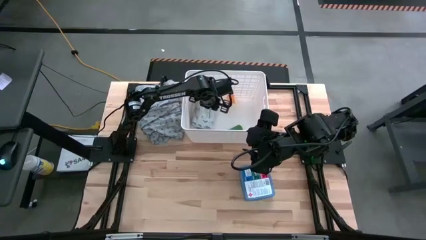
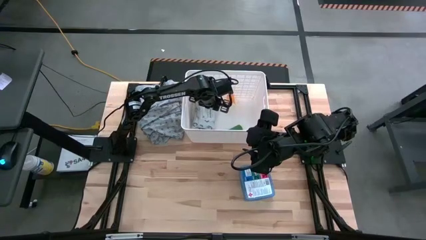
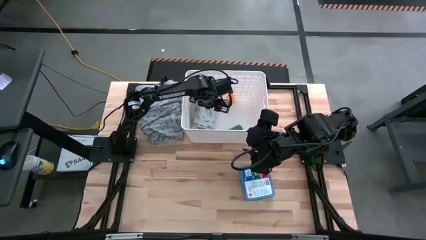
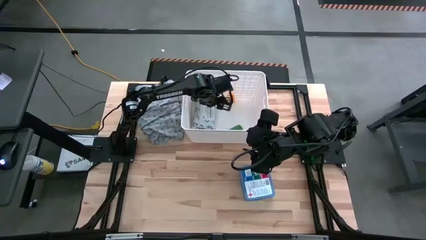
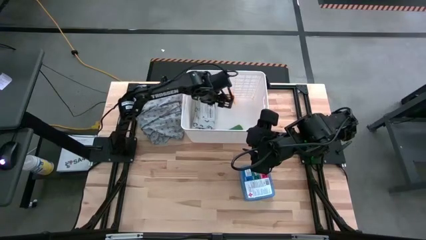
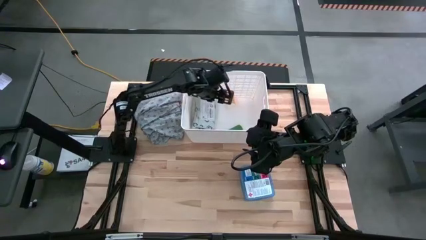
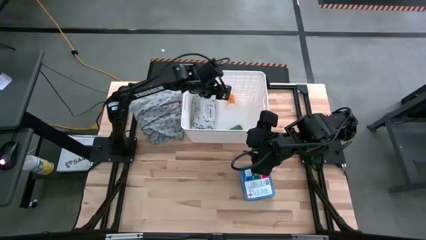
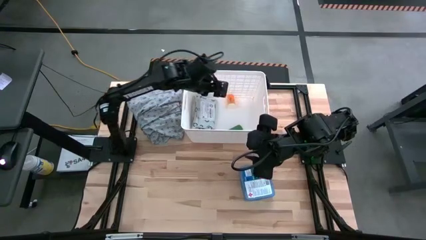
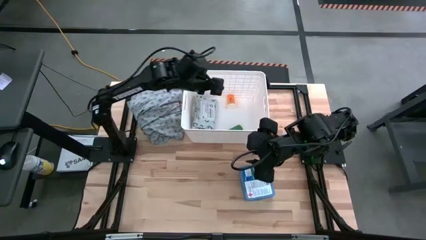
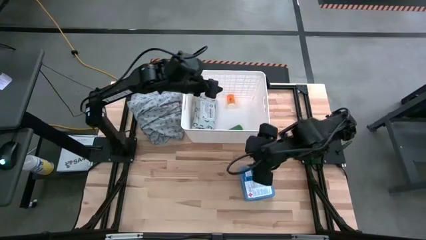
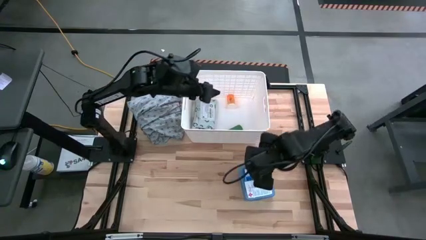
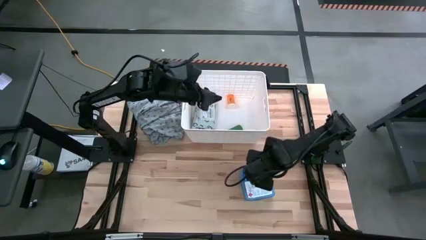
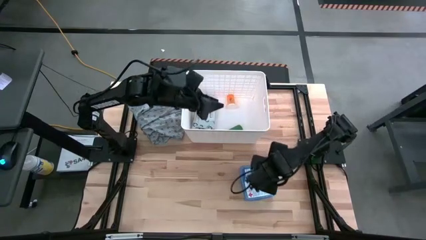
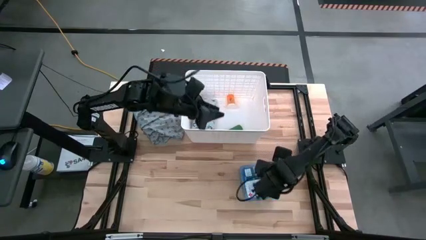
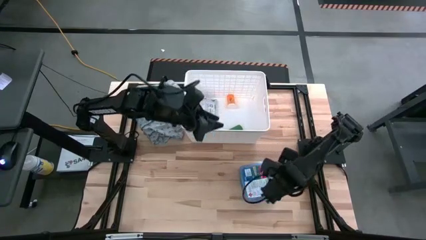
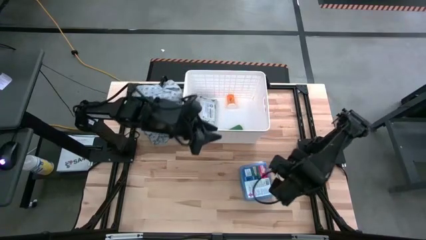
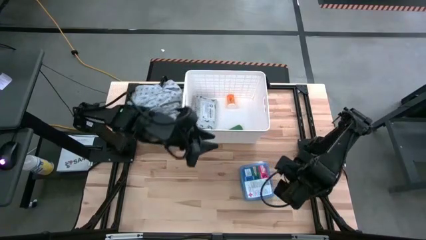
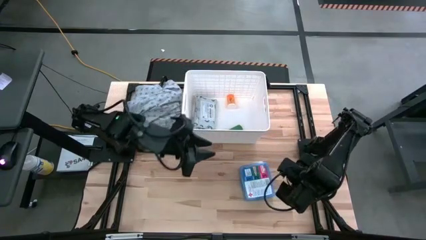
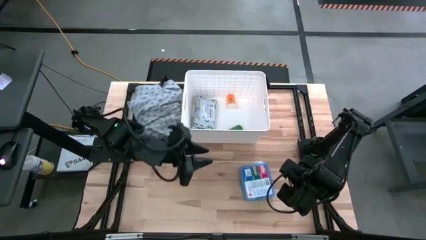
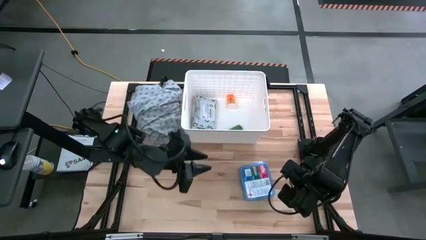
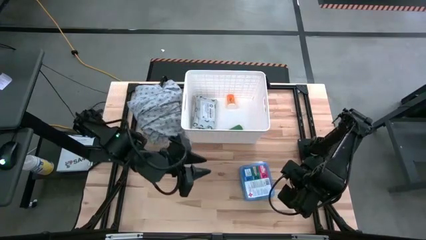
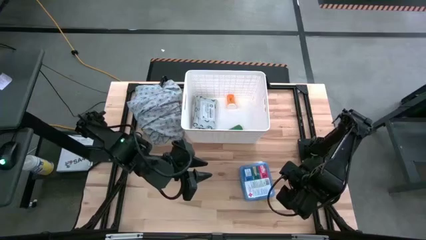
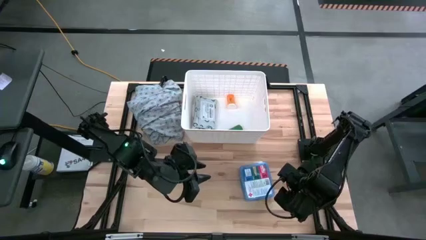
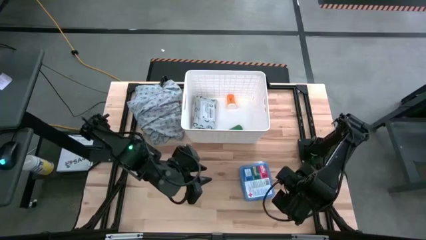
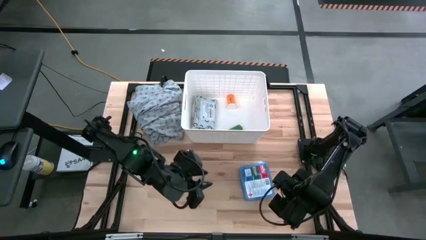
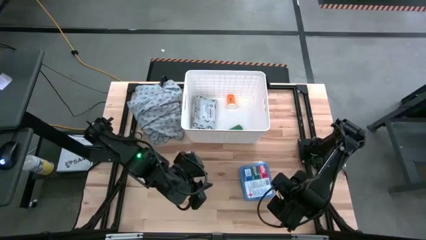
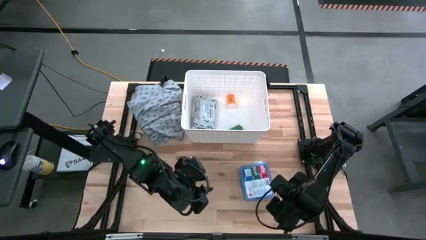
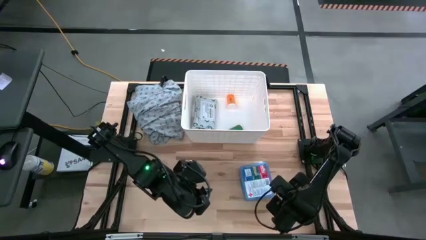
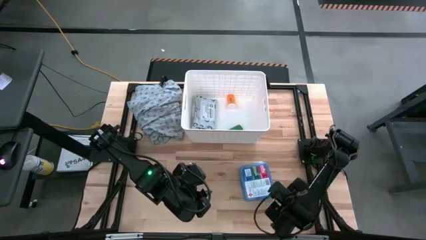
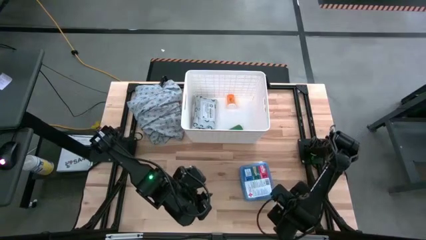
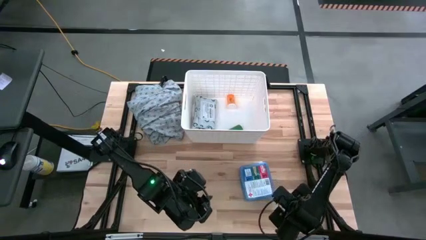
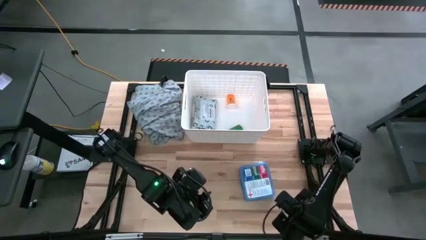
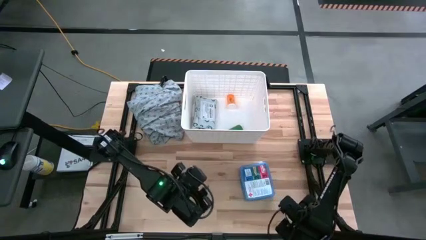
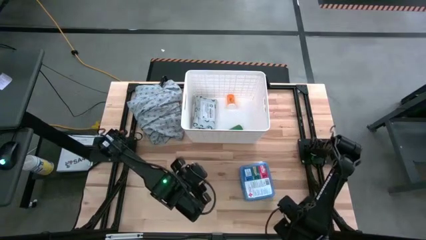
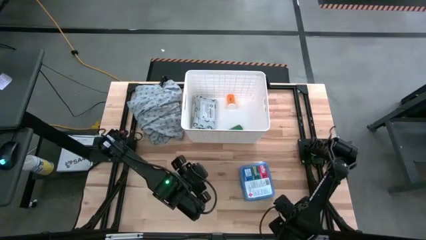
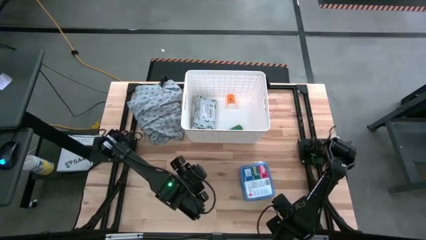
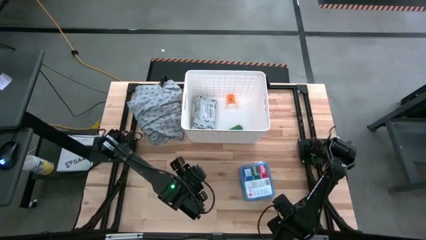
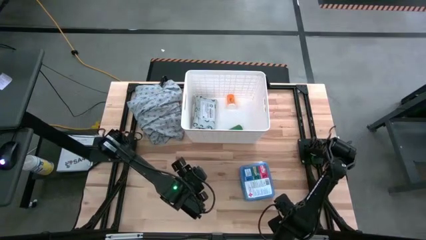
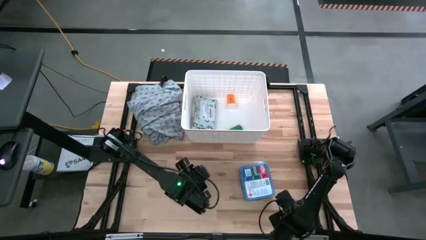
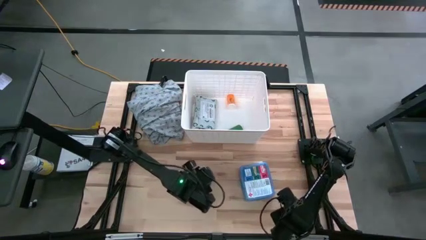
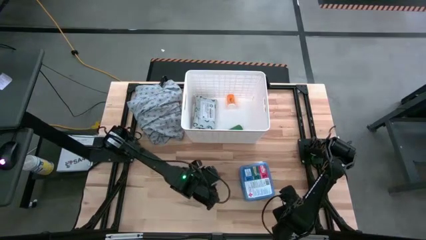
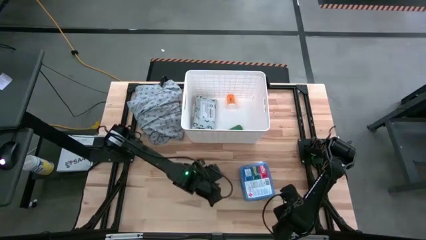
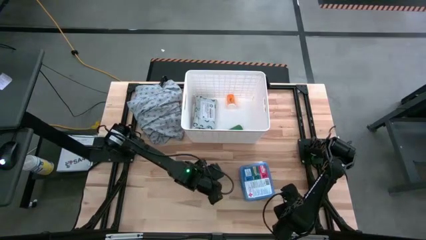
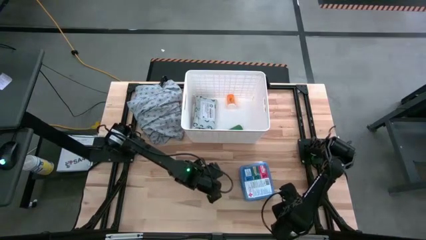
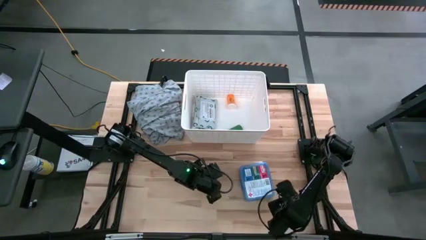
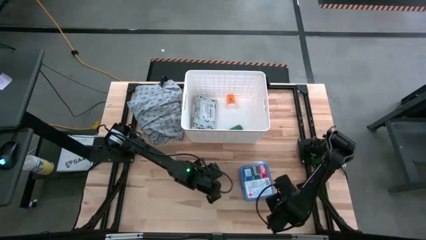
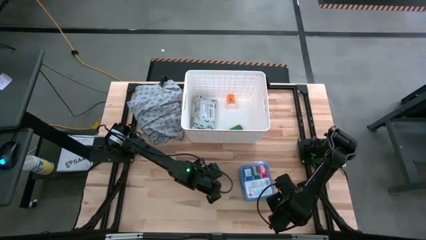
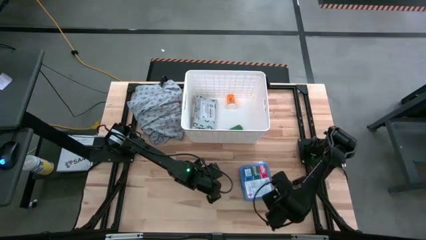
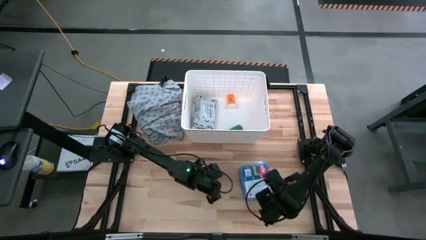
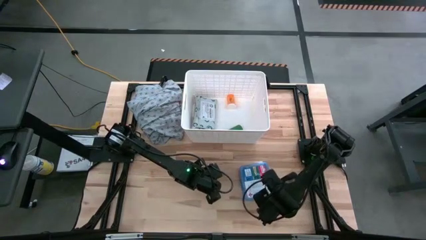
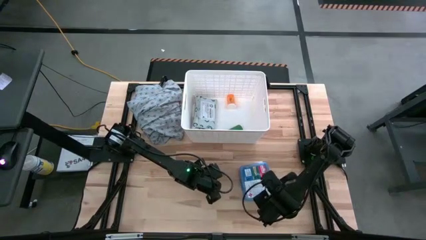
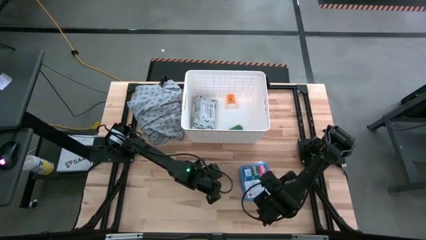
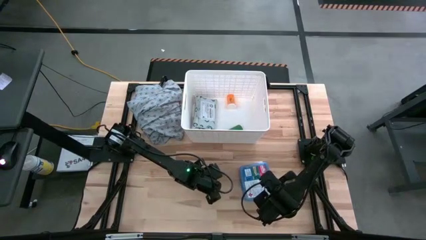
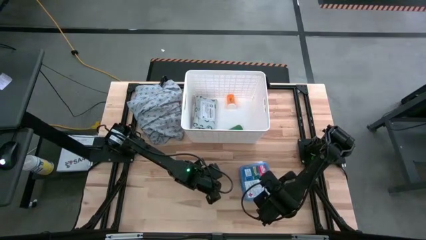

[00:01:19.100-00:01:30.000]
Task: Pick & place medical supplies in basket/bin
Put the blue first aid kit in the white bin

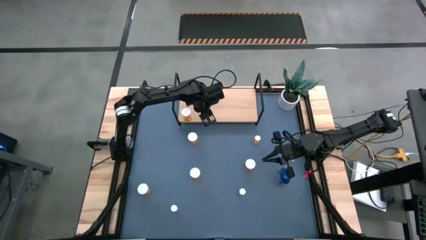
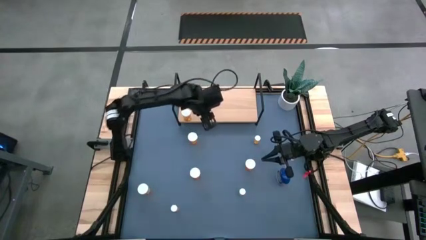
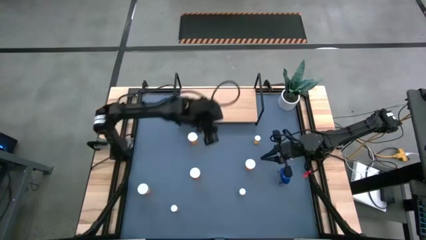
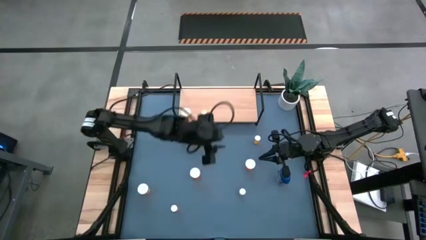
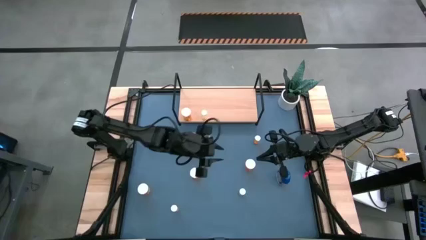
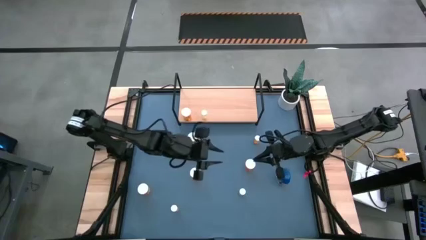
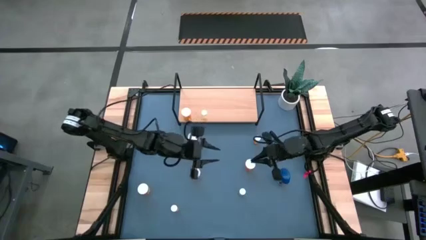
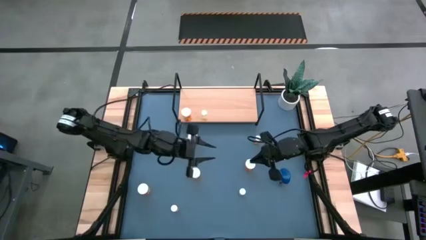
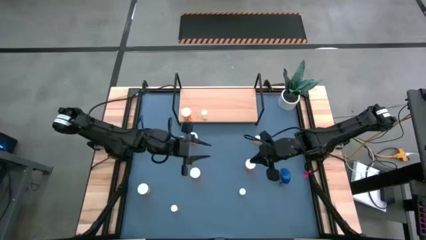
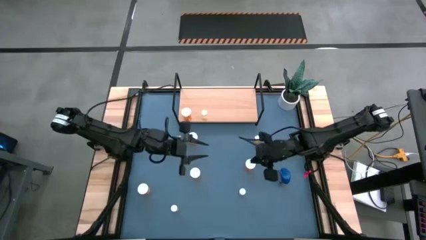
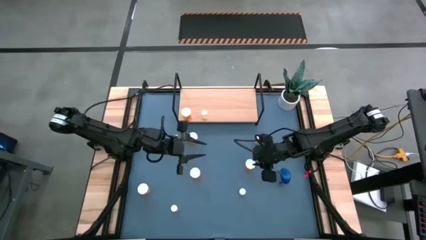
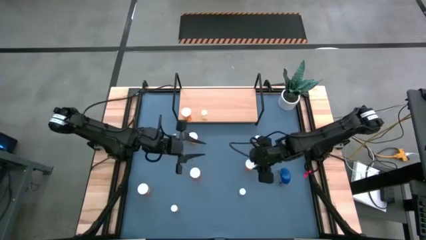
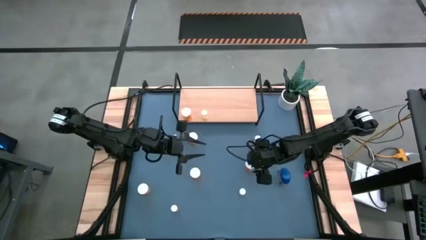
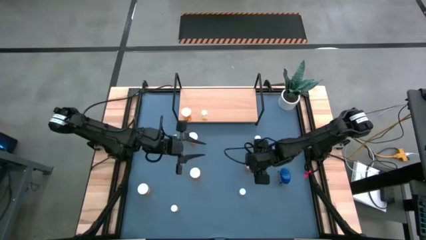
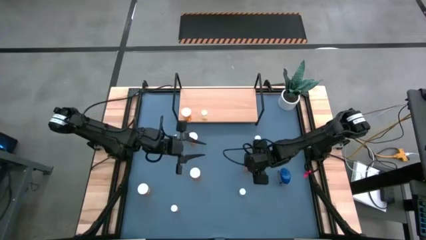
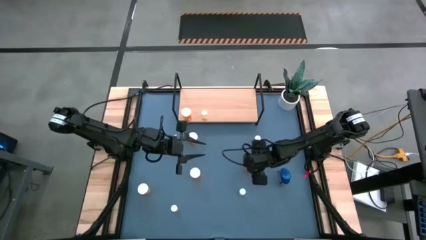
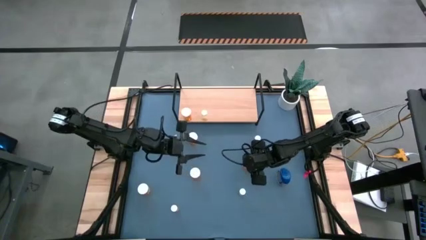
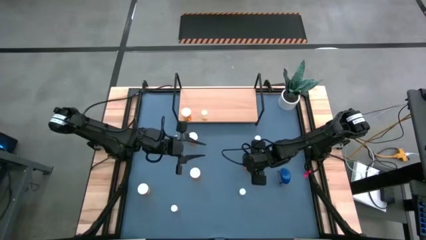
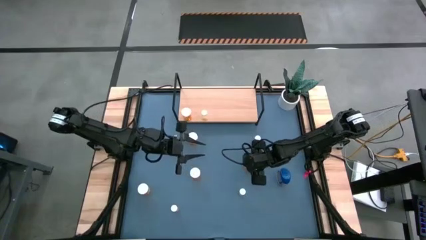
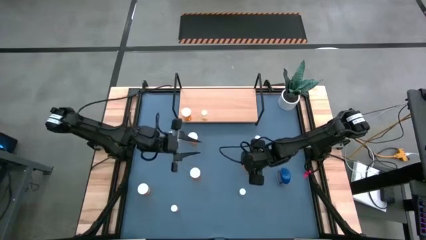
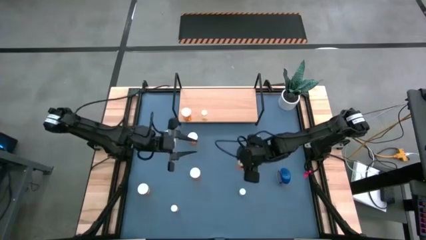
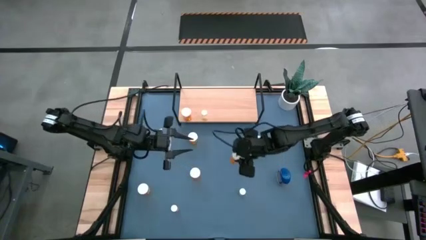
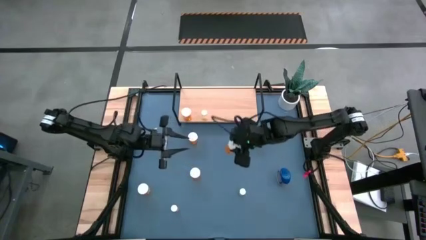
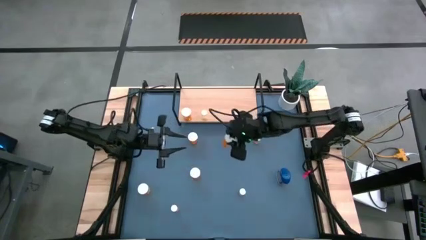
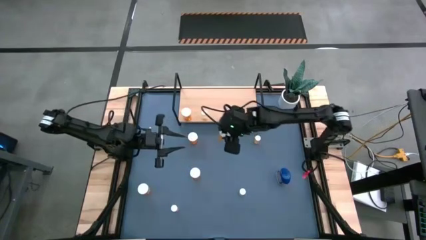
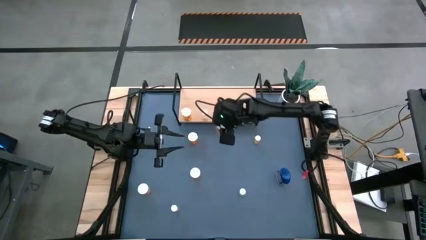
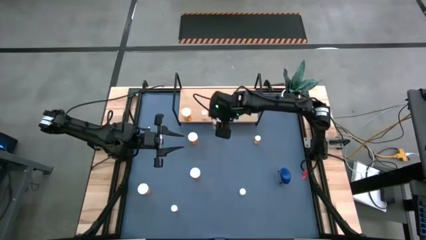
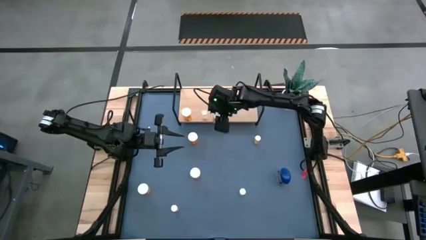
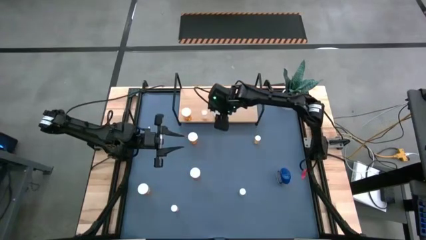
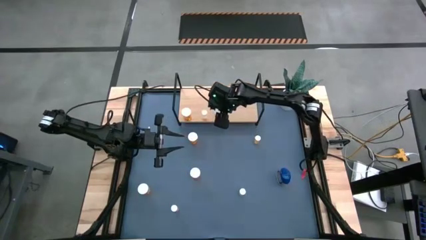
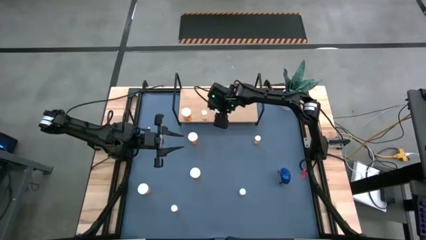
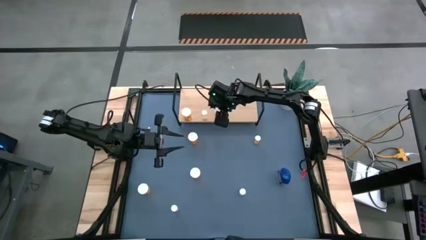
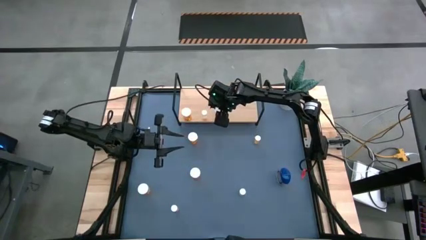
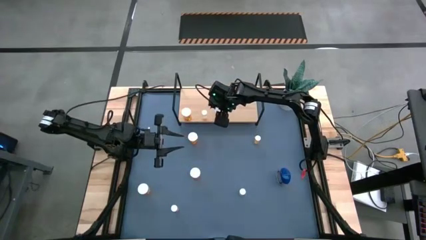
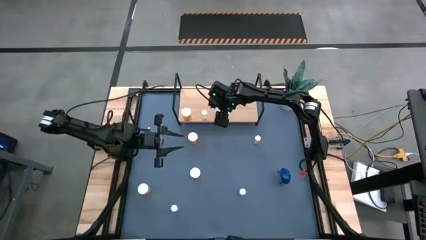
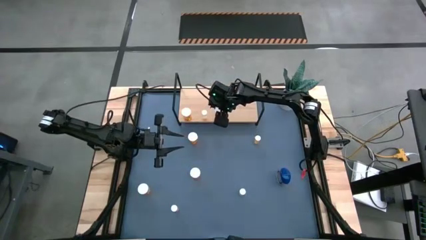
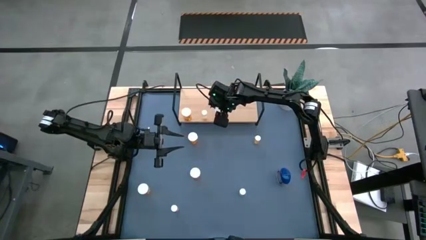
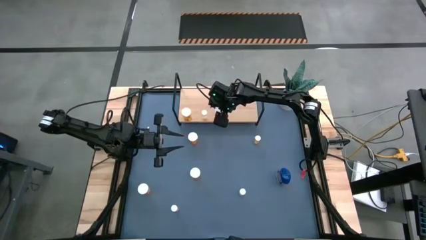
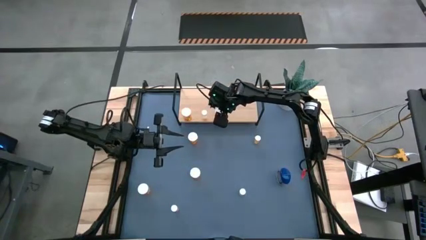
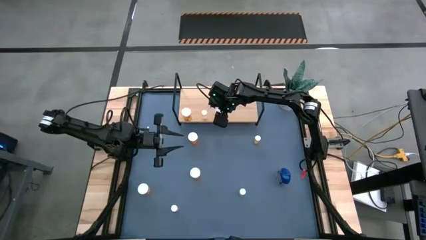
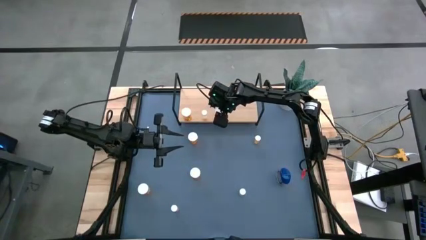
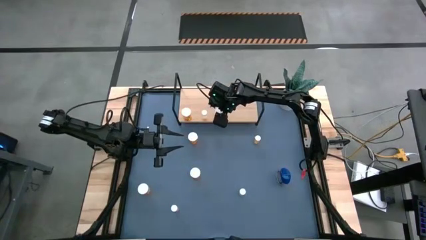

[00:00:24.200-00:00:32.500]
Task: Pick and place medicine bottles onto shelf by color
Put the orange pill bottle on the shelf
